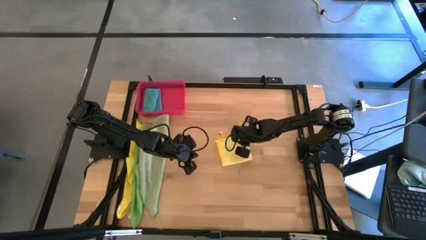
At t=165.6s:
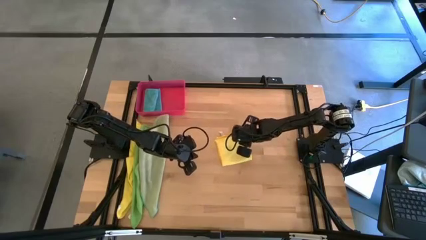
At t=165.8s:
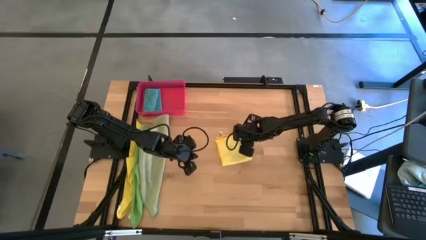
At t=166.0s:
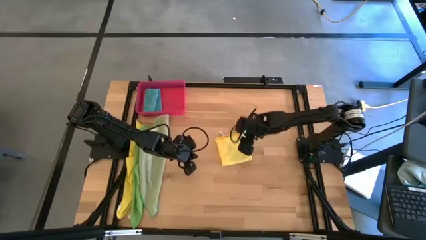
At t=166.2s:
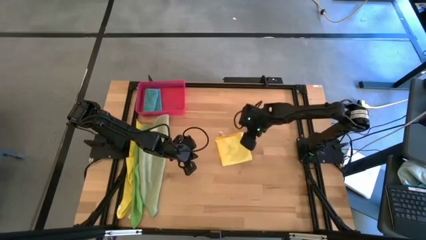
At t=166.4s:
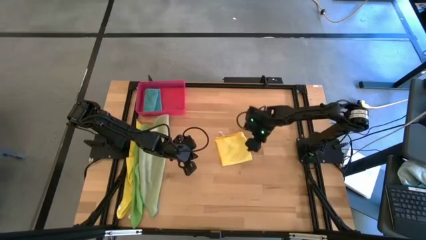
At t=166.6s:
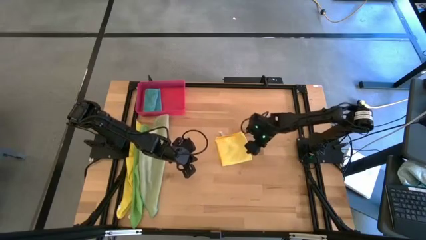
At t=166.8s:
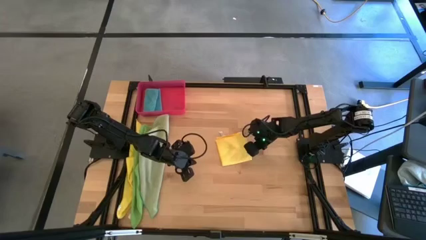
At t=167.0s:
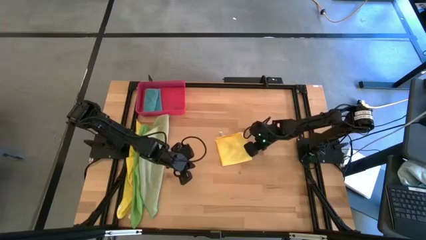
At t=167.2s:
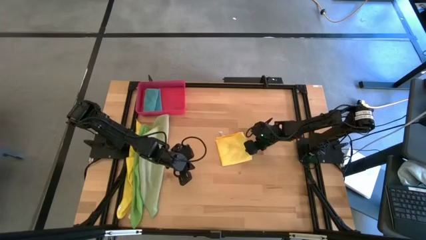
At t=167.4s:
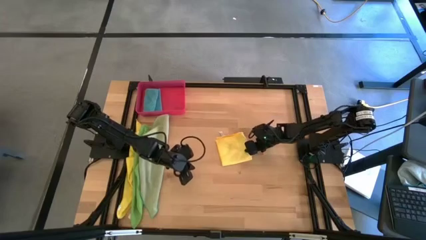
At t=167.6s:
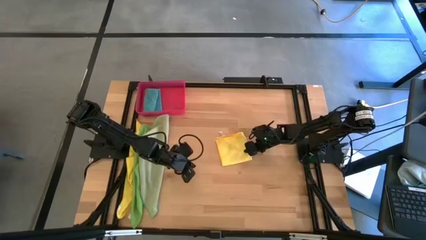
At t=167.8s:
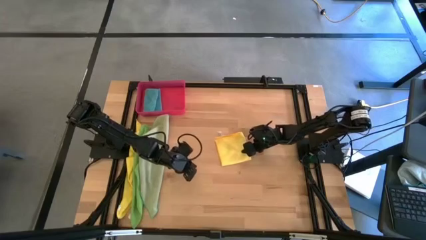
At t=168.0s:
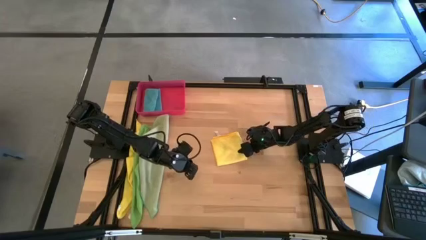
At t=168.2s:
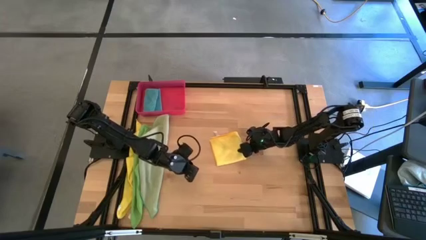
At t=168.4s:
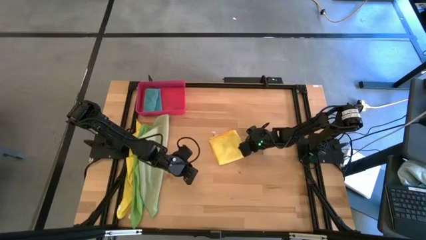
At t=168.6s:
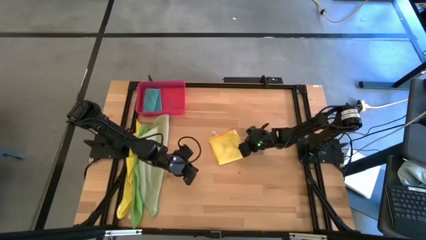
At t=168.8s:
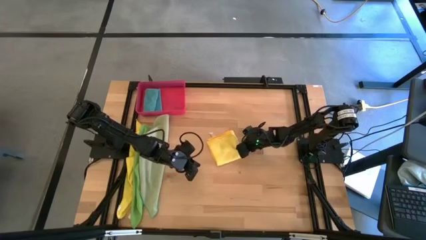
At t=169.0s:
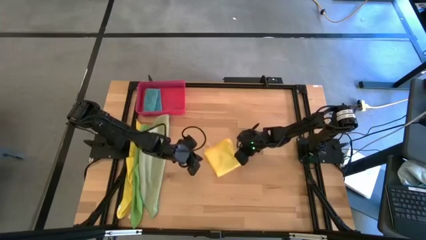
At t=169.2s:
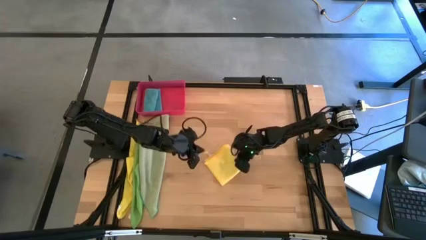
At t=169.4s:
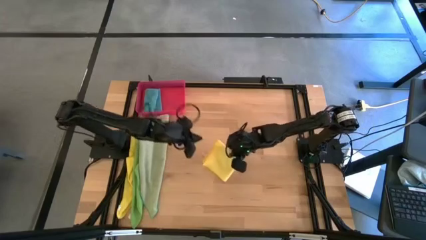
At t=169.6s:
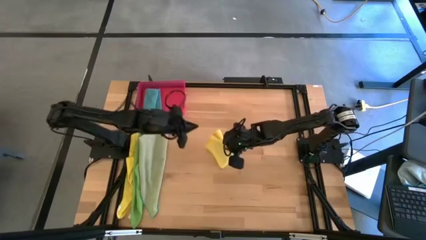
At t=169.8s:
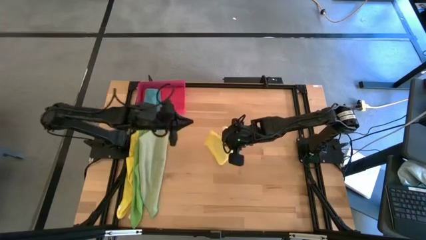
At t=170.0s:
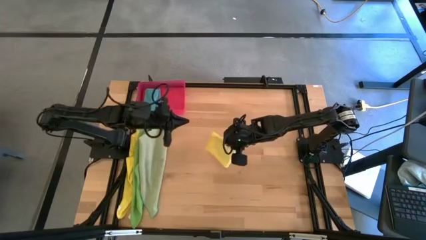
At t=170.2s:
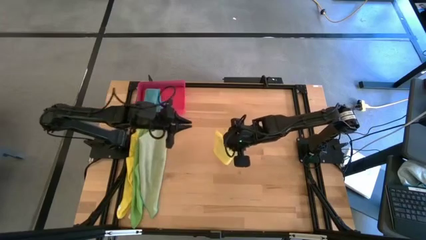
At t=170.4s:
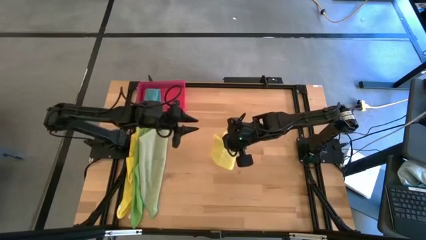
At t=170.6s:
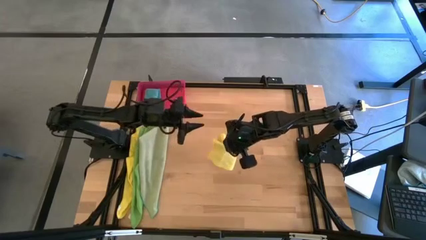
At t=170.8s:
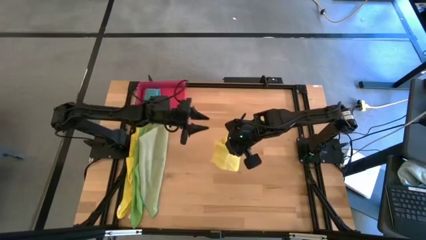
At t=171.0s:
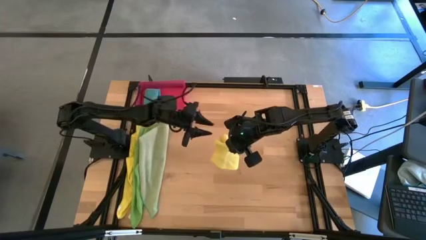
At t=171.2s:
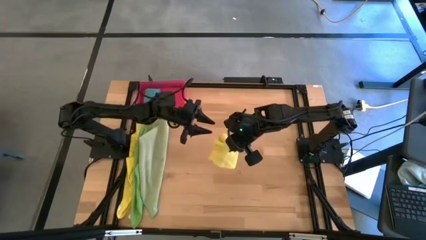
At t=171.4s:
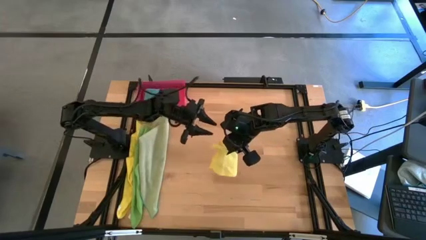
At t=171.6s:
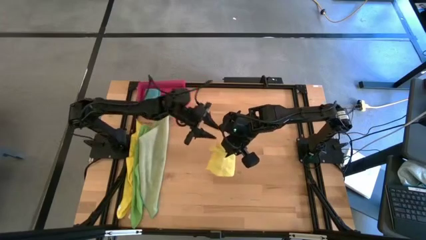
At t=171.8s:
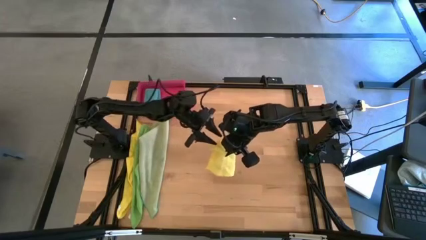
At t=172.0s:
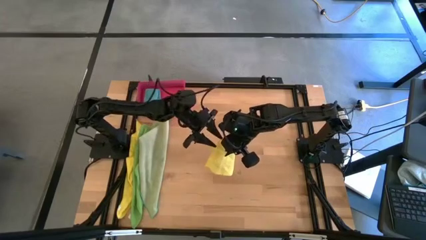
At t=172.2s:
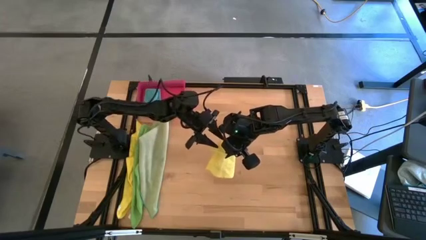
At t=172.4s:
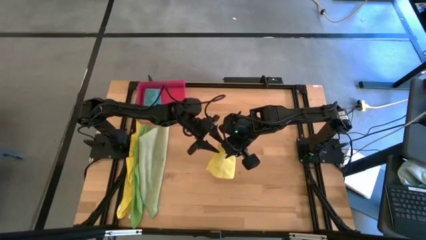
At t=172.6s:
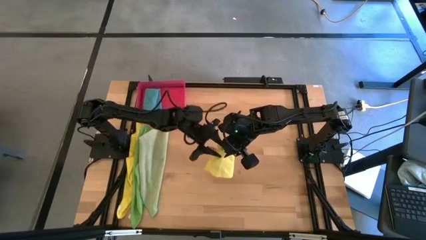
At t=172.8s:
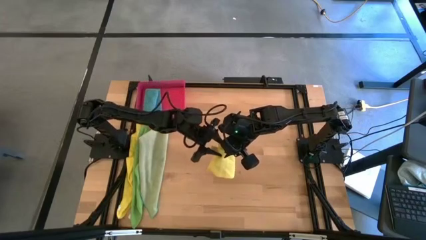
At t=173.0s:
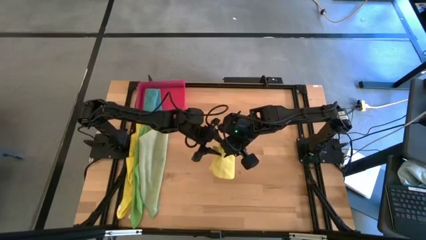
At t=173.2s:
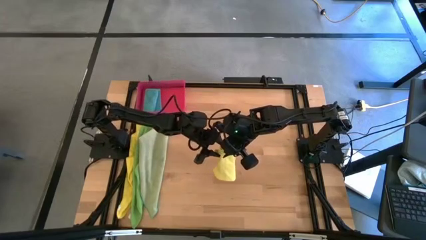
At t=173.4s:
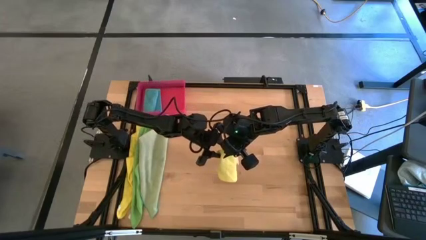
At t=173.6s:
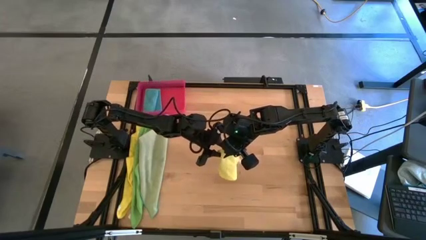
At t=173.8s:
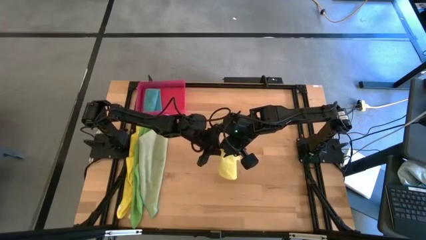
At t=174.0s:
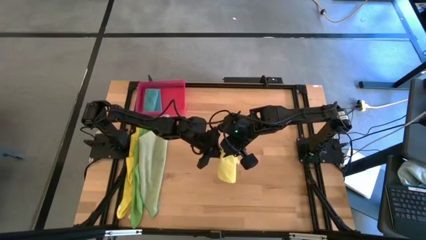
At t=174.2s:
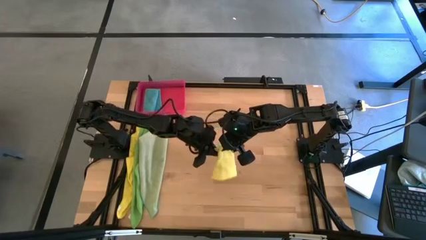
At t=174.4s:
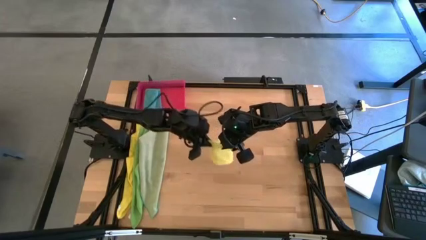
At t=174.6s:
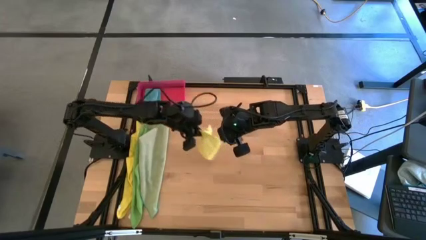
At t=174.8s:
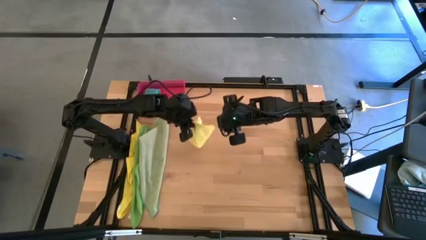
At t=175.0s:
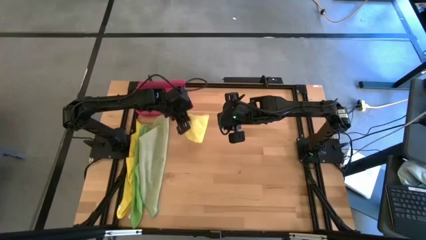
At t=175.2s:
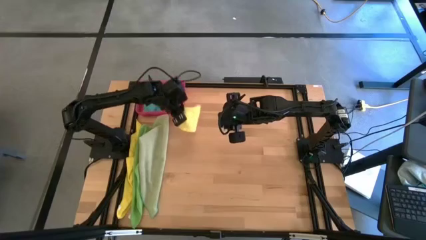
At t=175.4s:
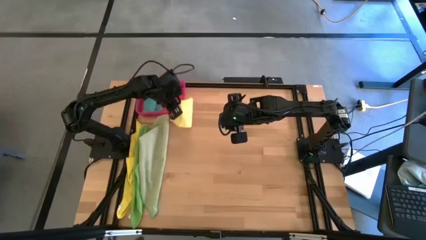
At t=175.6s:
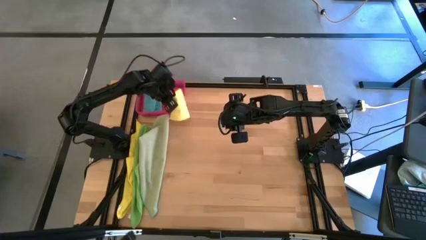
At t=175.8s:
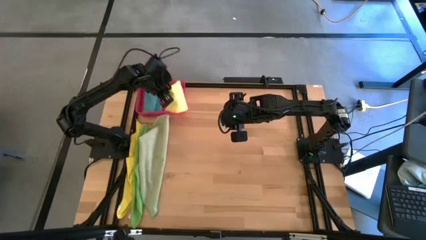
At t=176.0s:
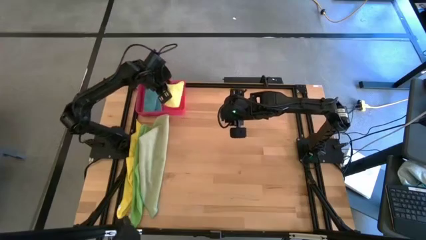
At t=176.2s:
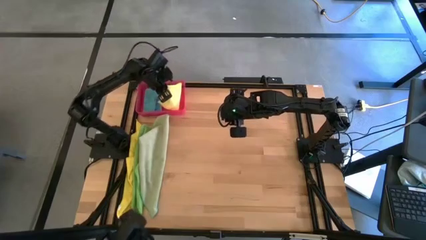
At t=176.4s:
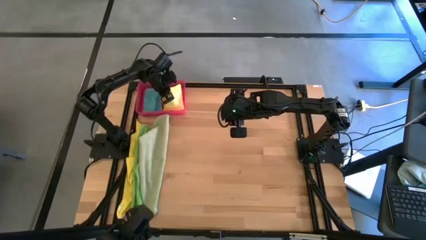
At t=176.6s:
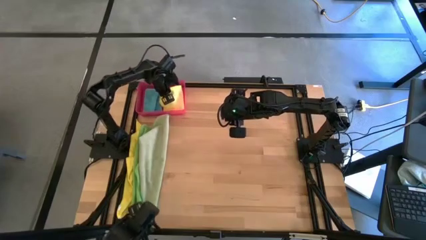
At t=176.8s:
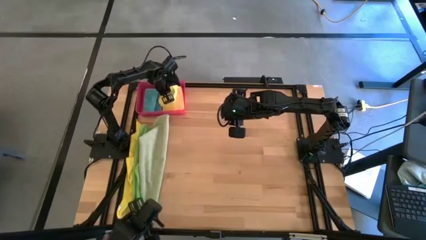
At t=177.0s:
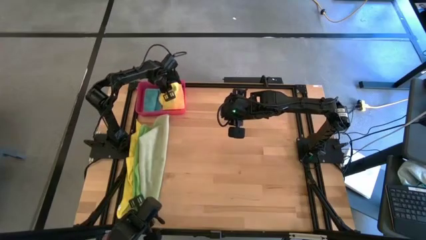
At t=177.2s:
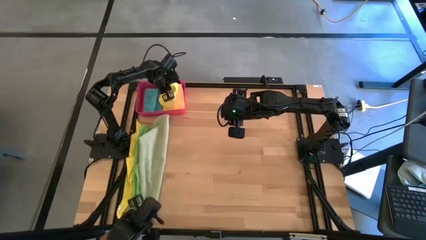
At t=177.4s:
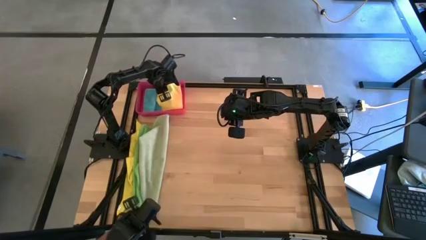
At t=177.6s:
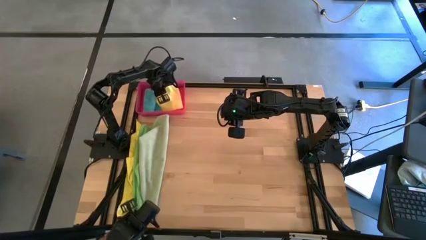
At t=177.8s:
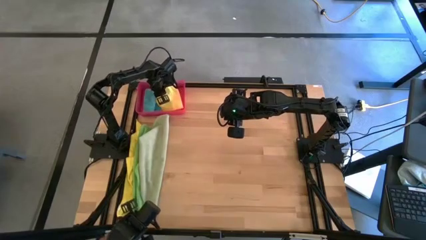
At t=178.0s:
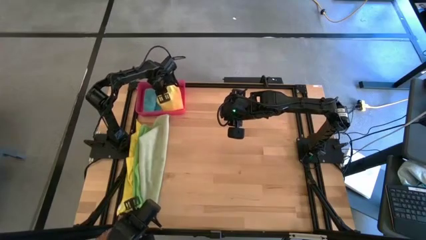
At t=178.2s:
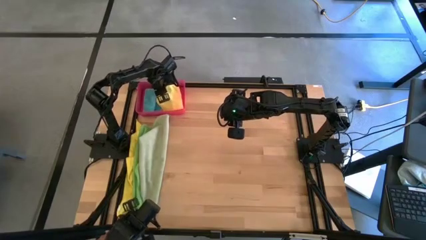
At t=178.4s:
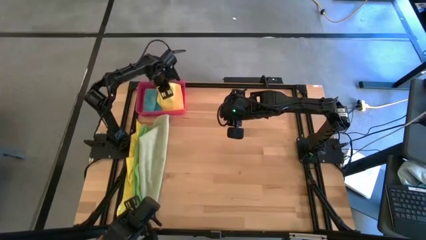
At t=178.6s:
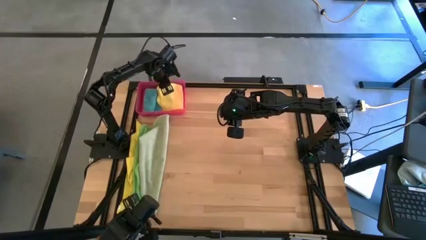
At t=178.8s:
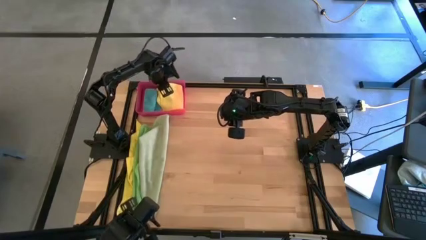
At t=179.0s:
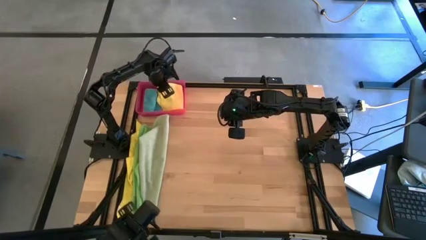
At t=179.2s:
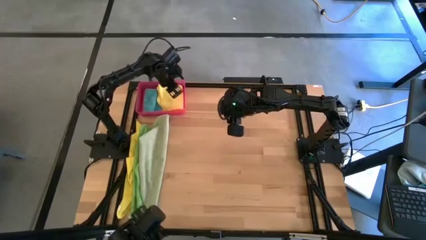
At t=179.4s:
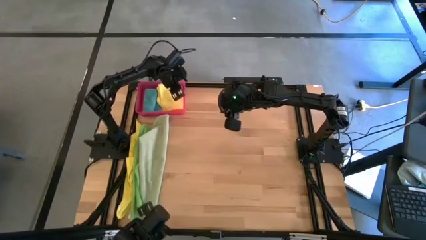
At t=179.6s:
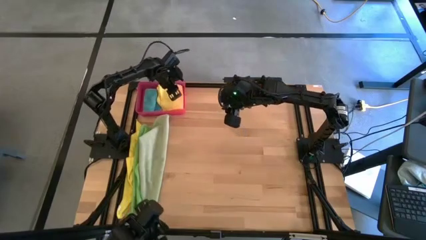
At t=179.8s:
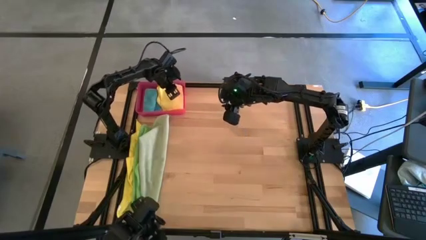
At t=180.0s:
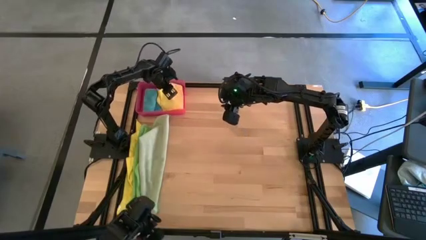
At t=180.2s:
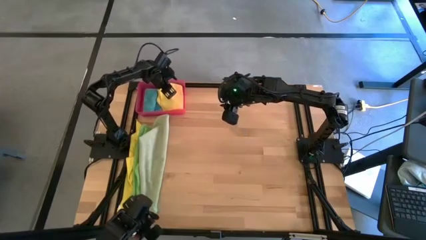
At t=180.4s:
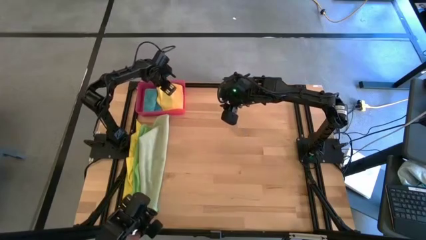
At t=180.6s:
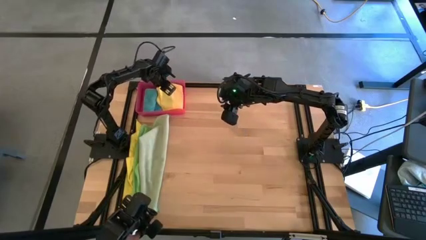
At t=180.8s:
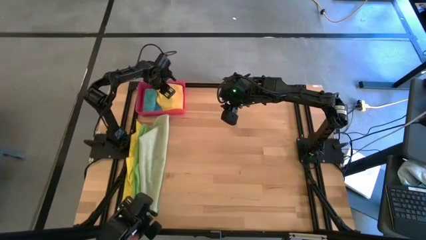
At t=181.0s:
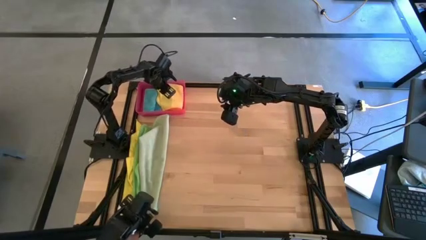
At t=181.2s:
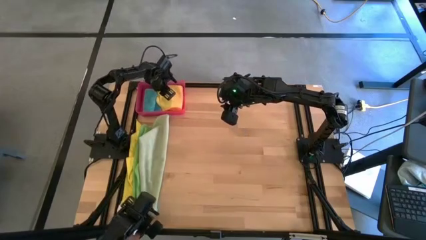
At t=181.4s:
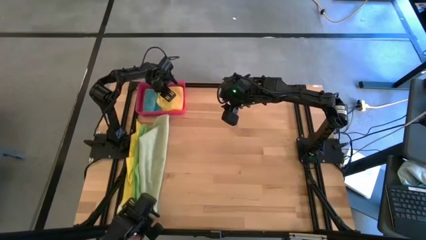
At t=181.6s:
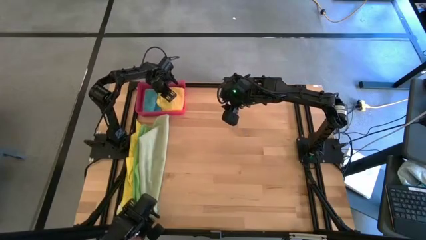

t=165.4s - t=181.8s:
Task: Fold microfiber towels
Put the folded right yellow microfiber towel into the pink bin
